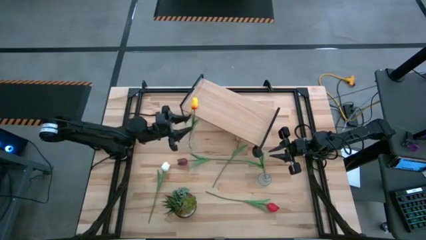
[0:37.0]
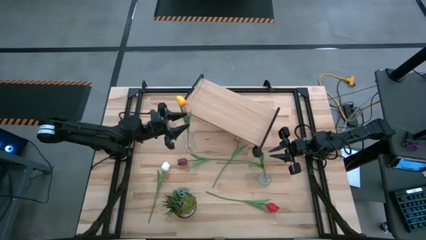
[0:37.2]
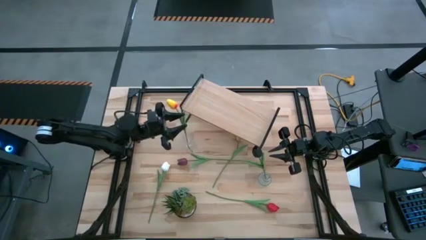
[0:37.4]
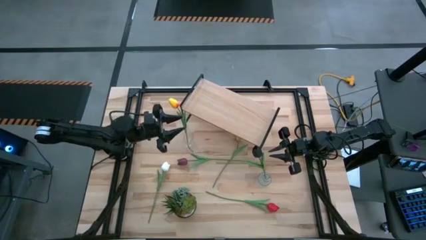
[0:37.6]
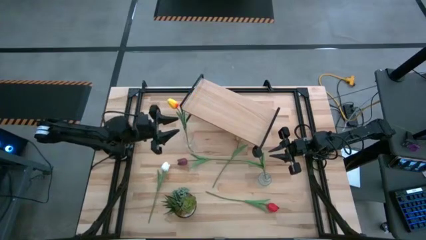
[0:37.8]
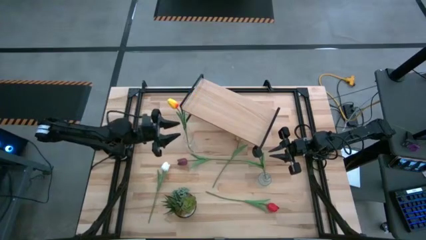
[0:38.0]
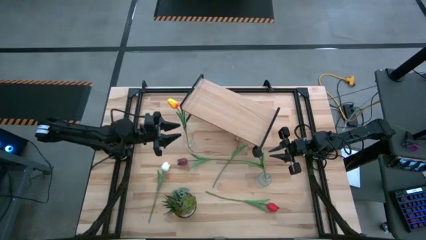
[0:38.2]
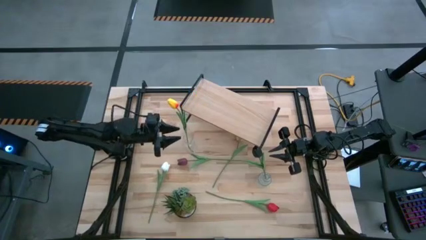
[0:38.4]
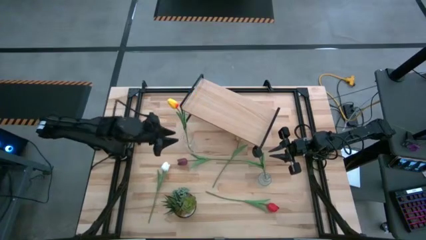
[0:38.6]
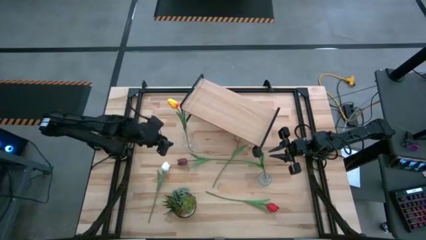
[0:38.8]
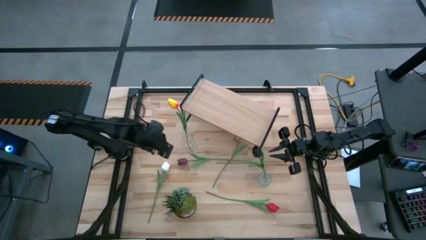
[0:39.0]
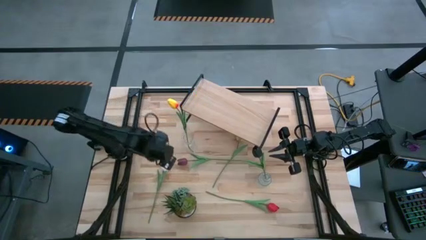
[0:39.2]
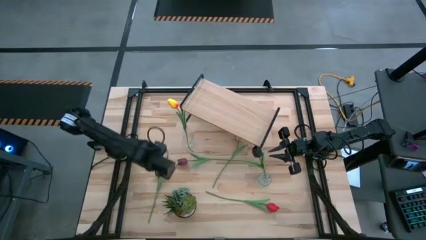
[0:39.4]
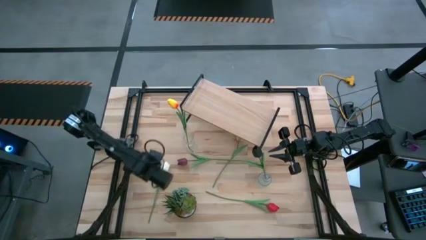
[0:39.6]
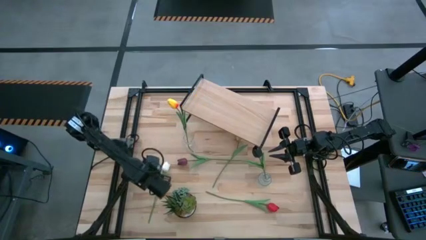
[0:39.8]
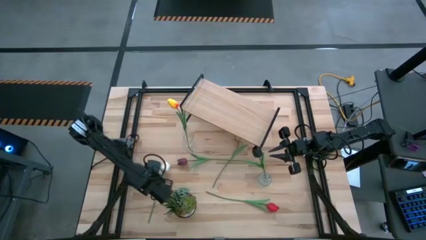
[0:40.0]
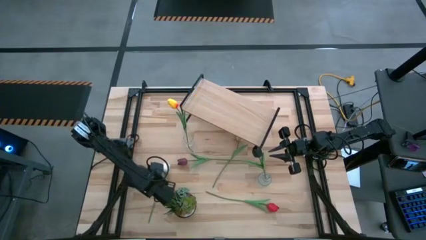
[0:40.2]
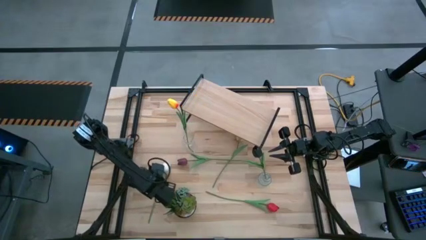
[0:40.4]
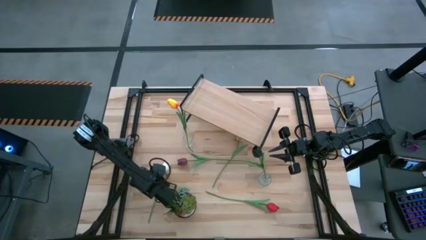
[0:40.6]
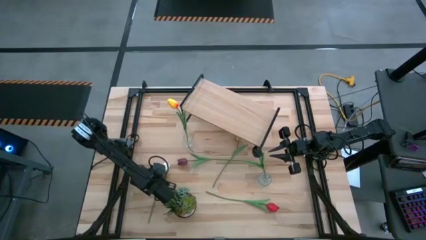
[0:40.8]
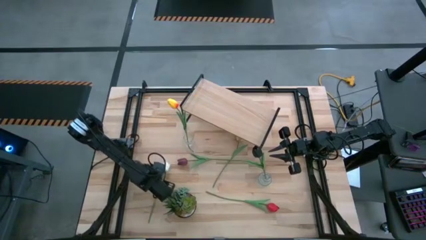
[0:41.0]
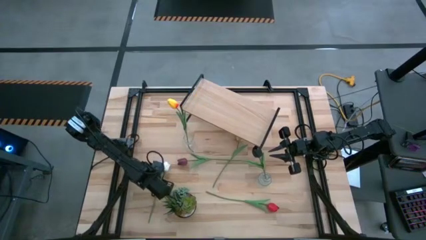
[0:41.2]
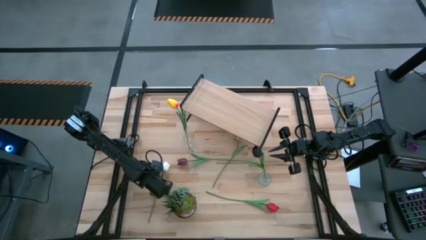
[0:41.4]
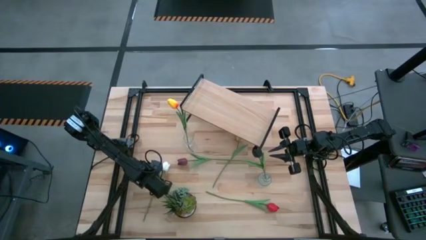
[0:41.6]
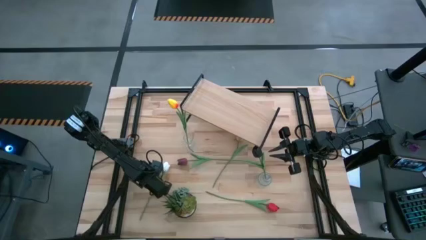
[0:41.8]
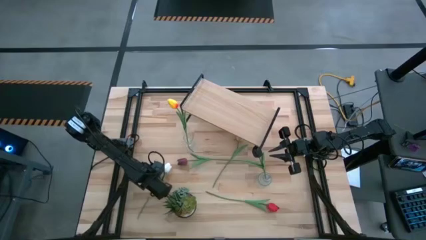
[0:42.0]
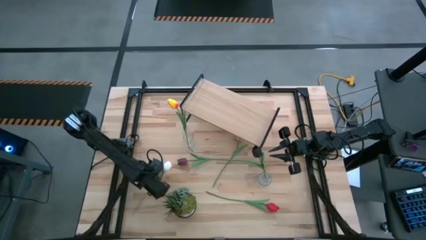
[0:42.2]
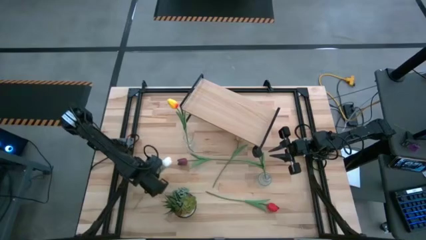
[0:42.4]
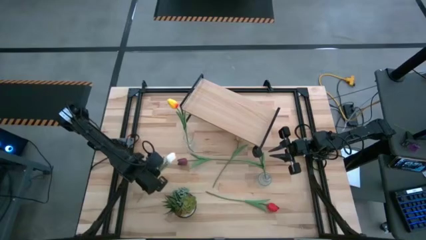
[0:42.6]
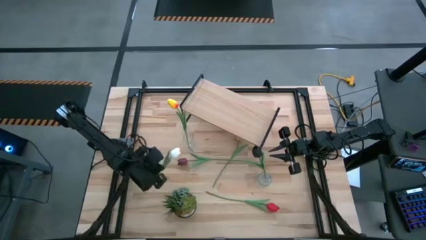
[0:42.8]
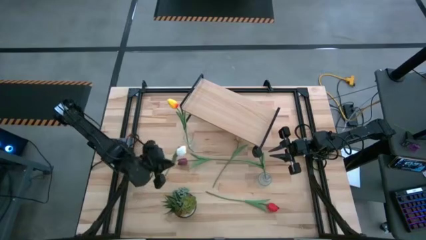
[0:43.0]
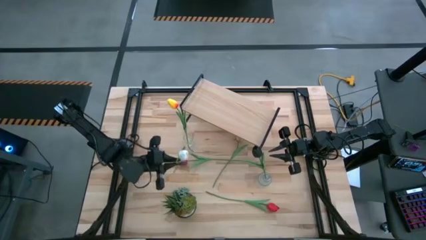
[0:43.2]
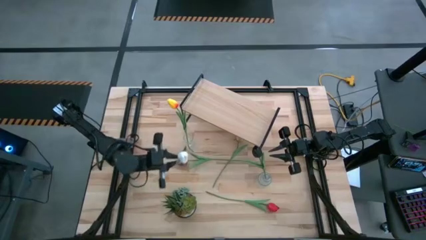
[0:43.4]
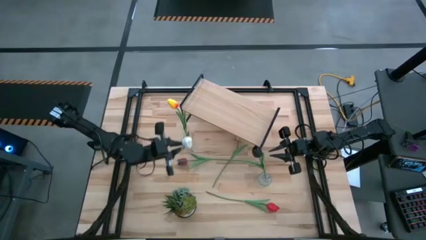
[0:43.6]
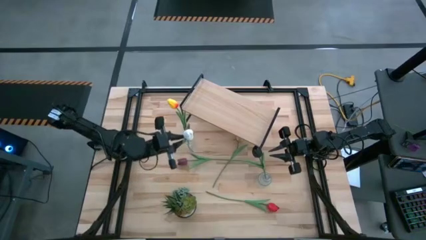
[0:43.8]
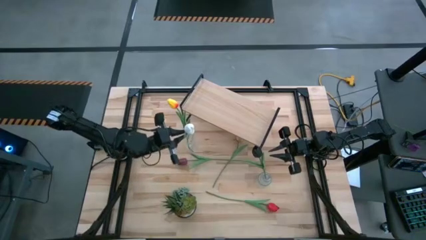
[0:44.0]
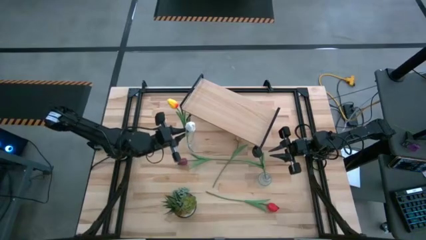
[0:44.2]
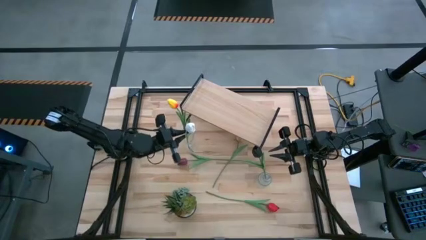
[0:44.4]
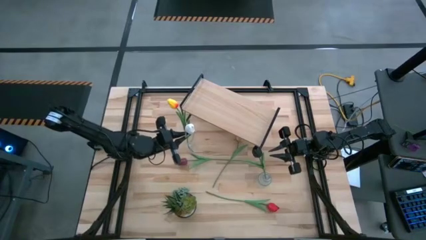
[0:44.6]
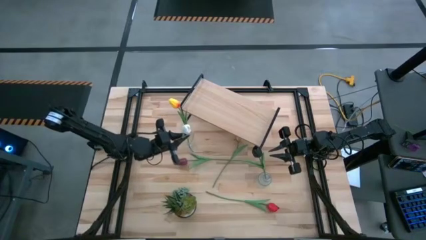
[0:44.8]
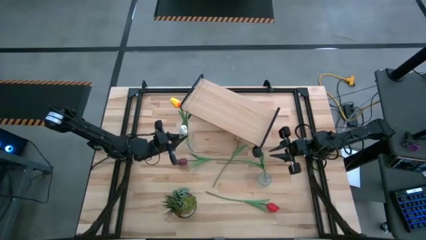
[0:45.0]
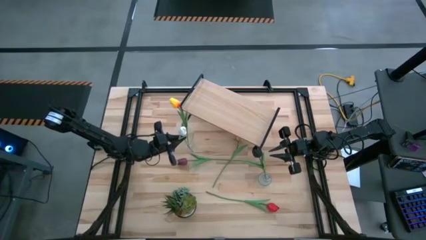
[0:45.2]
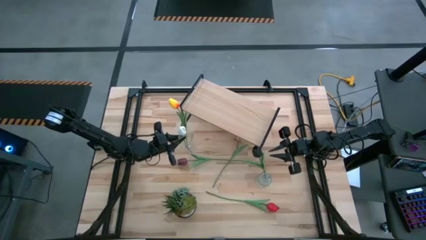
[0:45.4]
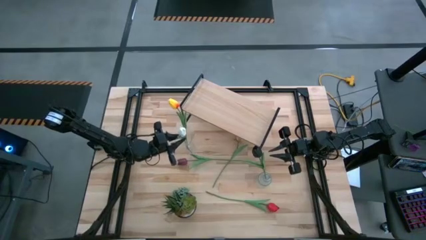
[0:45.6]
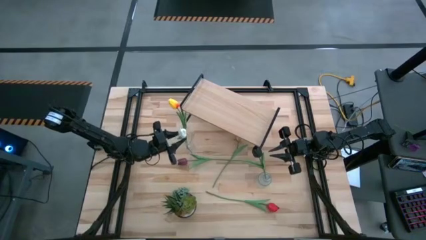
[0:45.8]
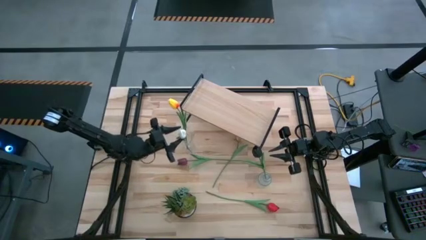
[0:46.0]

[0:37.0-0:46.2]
Task: Pick and place flowers into a vace then onto a shelf
Put the white tulip into the left transparent vase

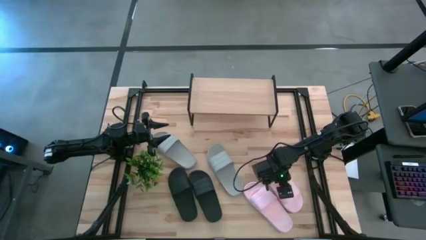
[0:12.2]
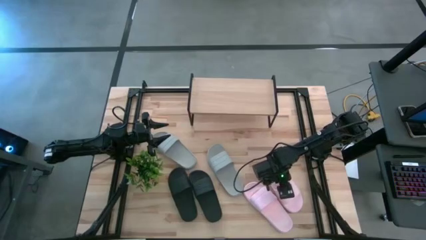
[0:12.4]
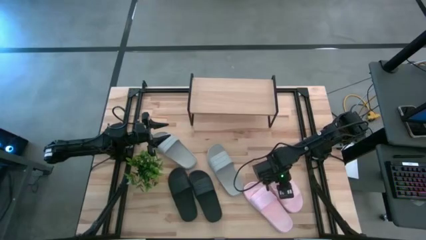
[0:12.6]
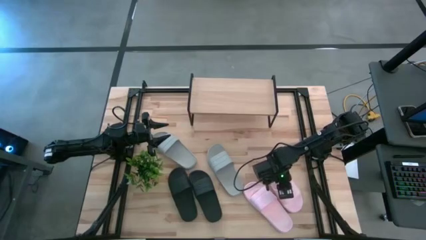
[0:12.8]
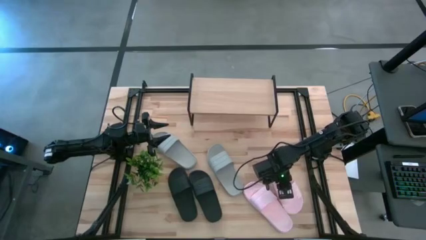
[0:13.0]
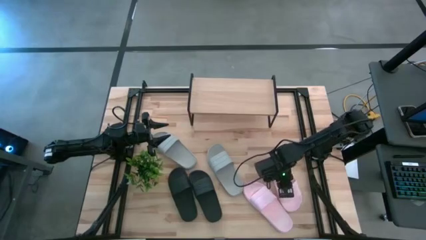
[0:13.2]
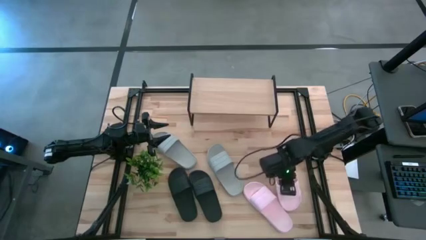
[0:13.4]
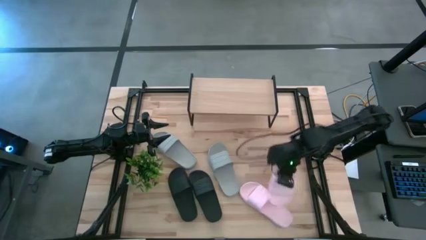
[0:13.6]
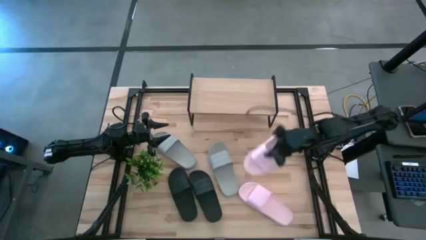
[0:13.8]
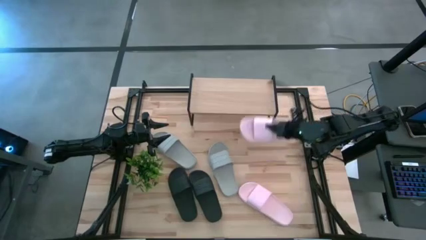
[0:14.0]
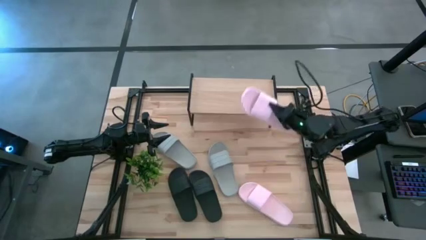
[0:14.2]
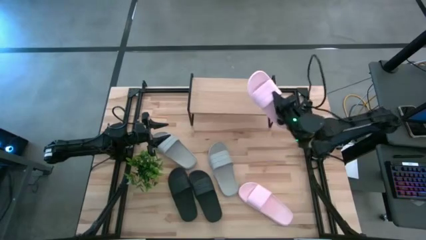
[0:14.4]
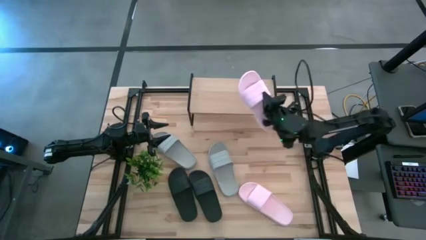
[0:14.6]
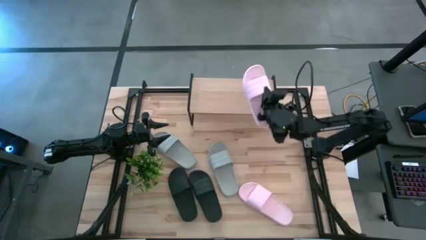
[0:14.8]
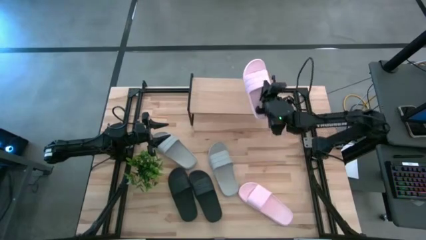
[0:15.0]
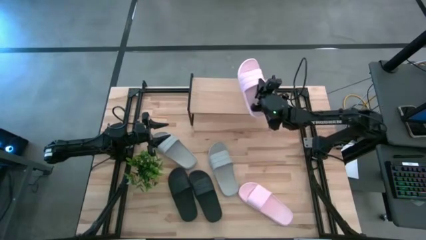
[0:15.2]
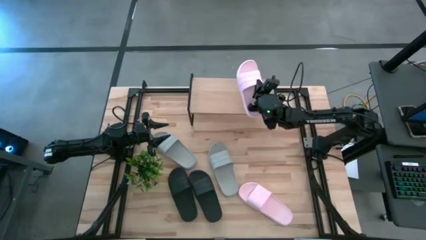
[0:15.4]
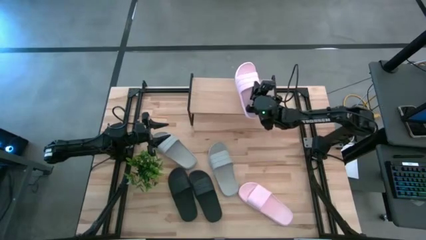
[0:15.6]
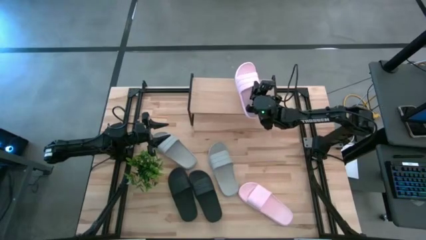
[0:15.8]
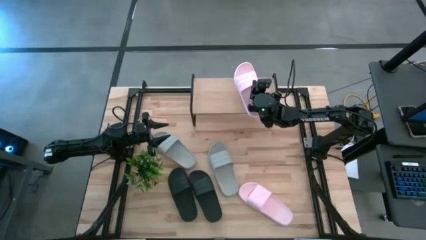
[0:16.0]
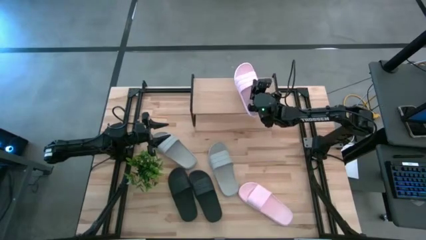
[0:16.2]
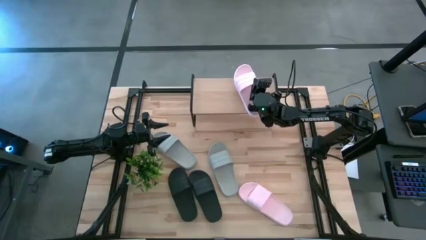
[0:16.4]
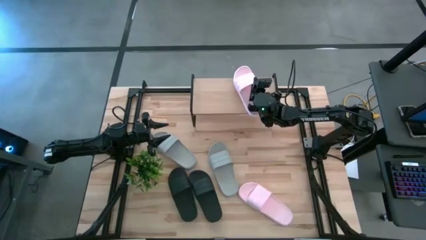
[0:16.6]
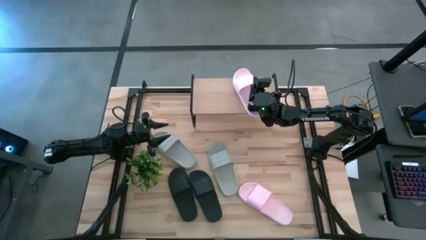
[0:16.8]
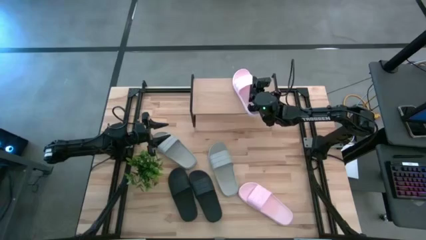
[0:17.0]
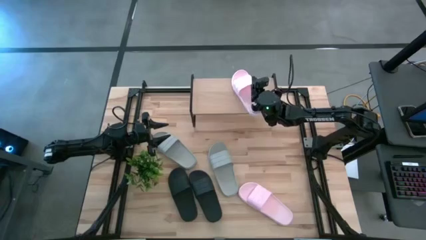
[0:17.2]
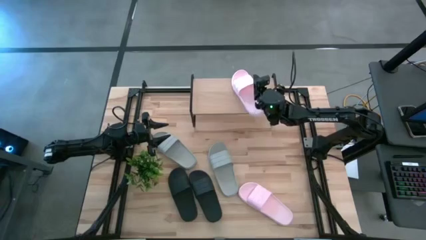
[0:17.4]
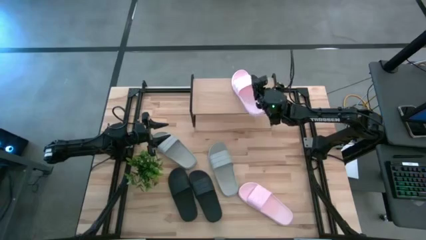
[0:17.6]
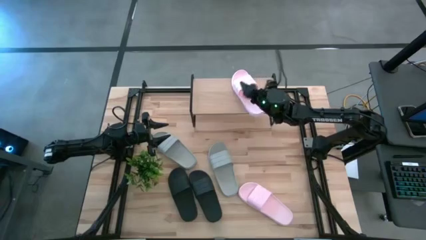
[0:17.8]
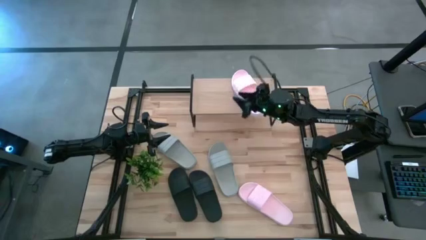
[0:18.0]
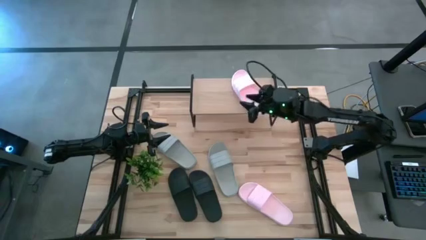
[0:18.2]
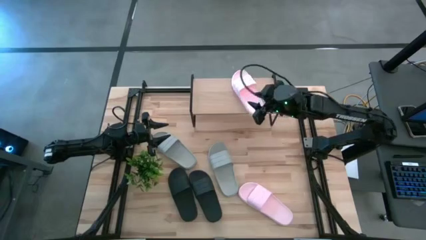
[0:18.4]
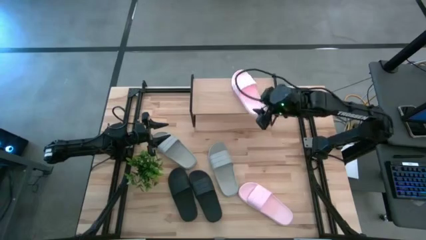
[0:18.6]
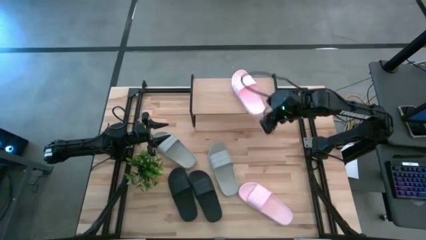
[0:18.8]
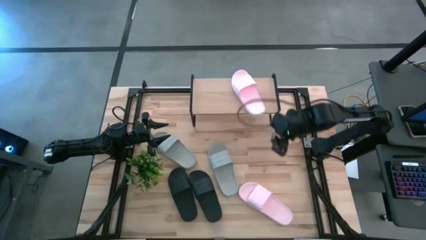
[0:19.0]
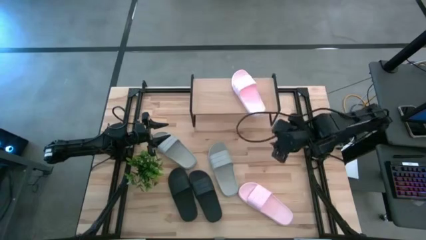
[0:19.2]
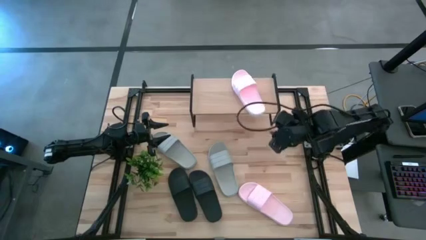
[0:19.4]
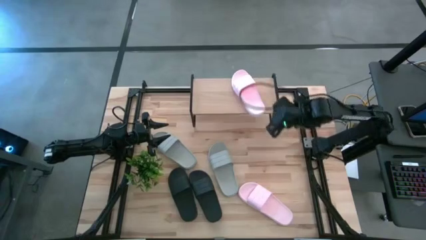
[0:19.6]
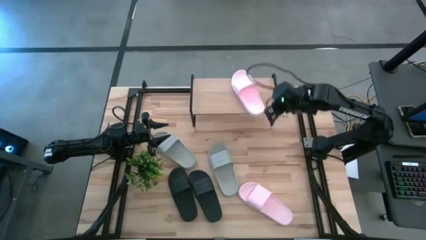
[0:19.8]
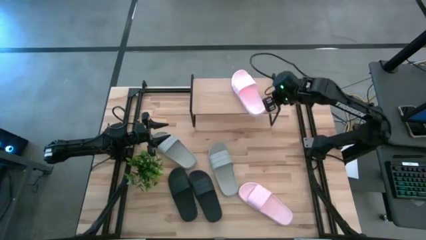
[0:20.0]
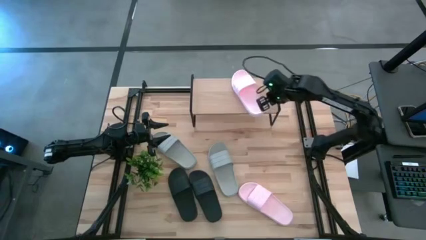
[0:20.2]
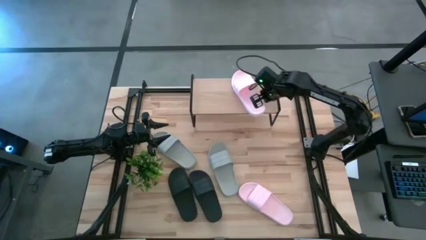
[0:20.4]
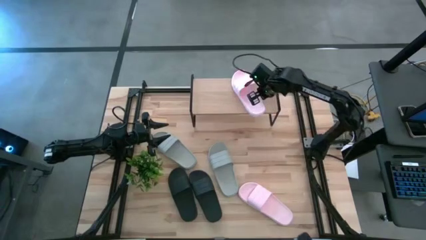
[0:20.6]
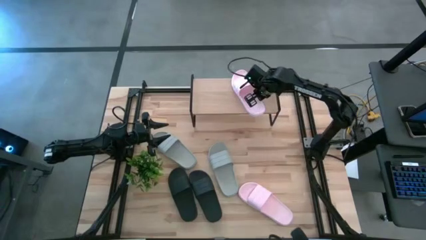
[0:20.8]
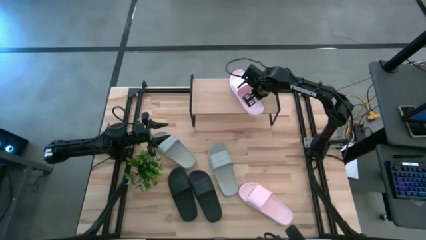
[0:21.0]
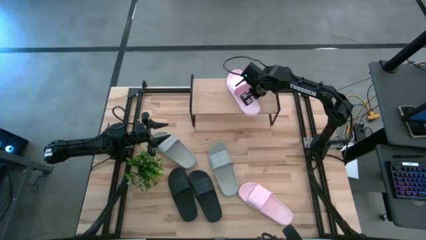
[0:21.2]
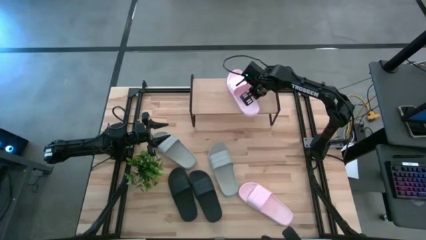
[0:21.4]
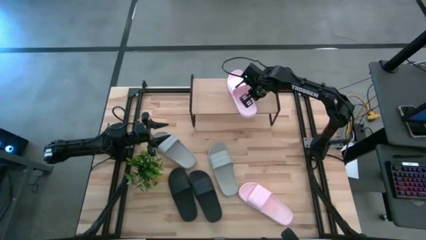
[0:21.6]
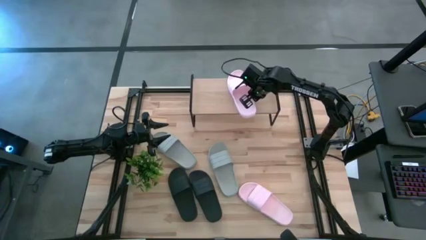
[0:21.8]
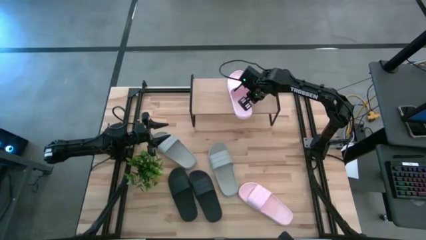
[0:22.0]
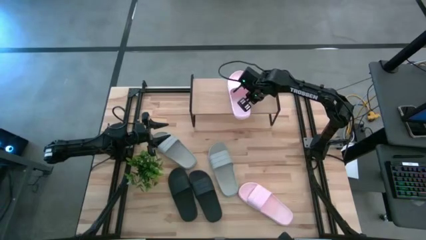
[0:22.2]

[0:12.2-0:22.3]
Task: Pick and place slides into the shelf
Put the right pink slide on the shelf
